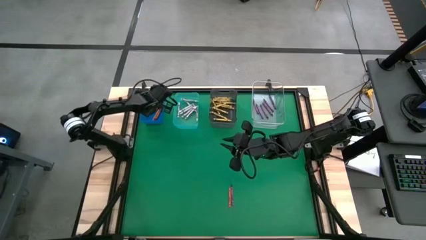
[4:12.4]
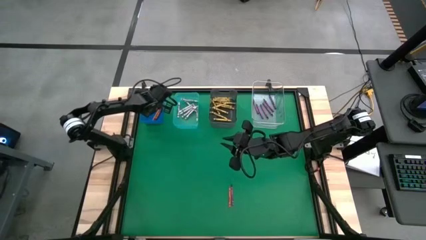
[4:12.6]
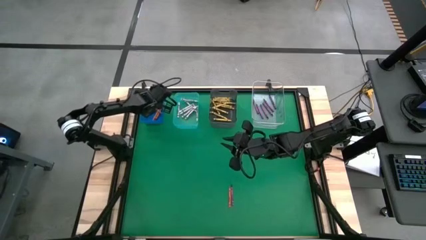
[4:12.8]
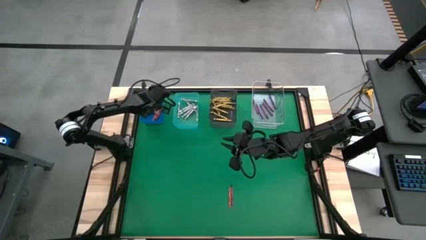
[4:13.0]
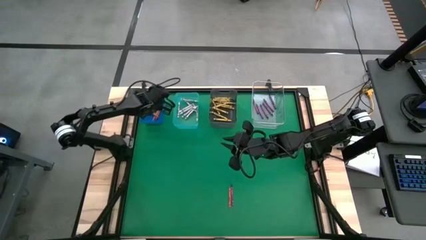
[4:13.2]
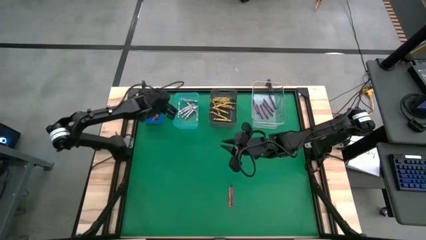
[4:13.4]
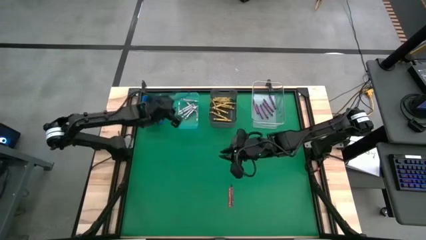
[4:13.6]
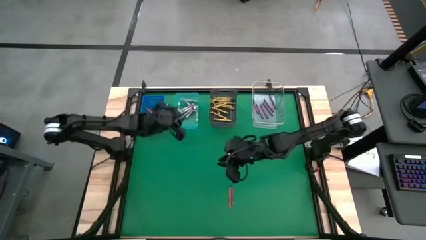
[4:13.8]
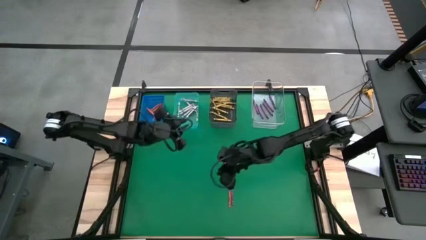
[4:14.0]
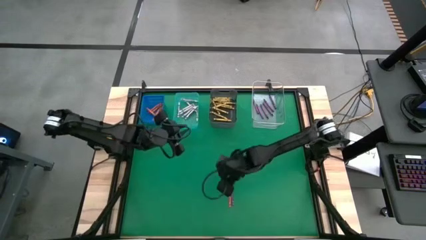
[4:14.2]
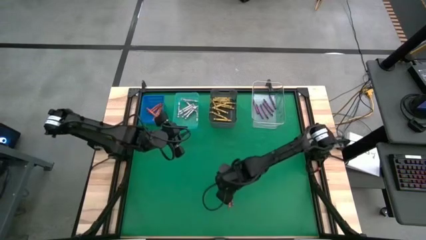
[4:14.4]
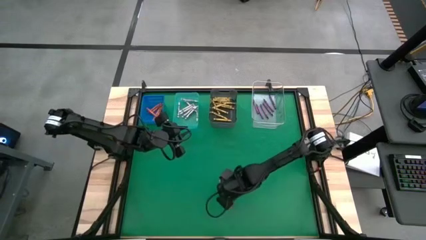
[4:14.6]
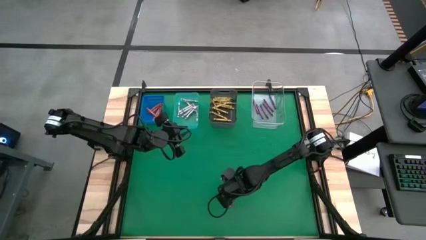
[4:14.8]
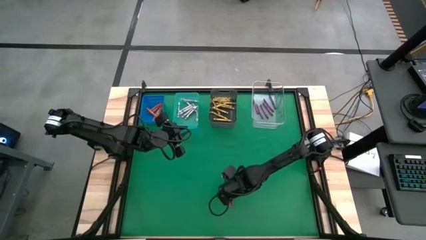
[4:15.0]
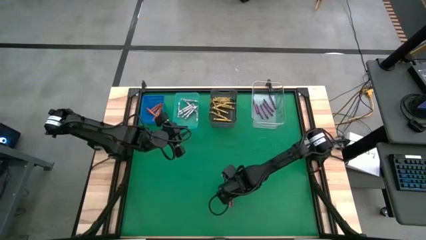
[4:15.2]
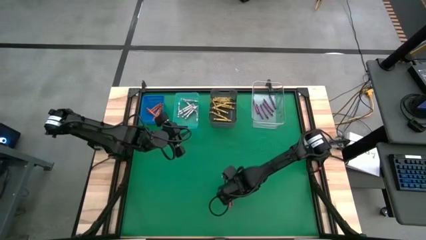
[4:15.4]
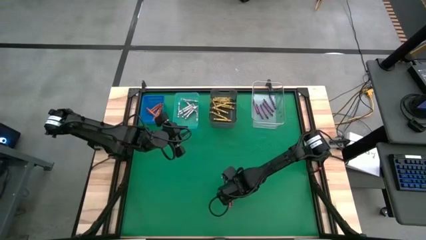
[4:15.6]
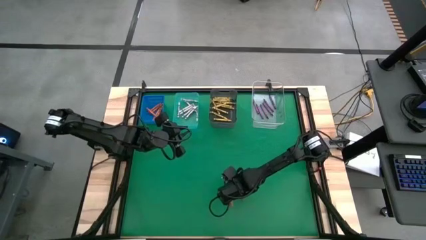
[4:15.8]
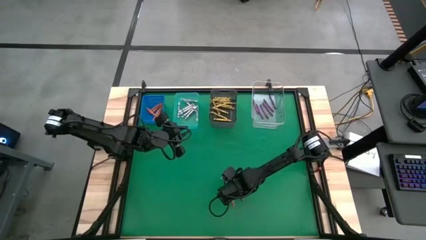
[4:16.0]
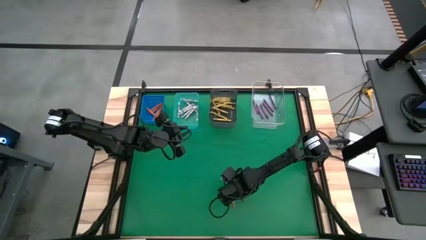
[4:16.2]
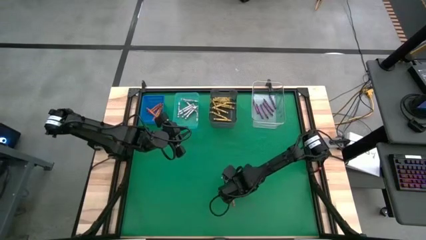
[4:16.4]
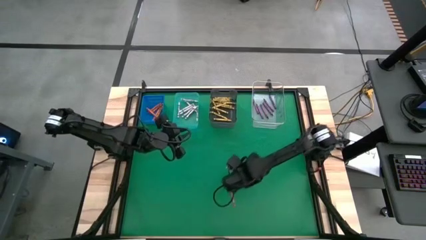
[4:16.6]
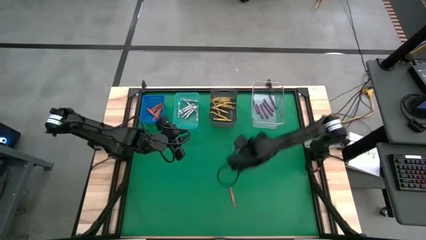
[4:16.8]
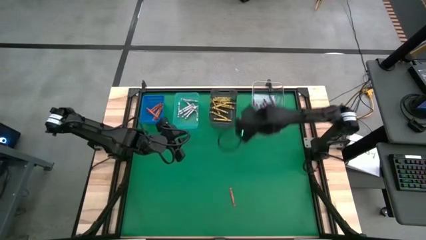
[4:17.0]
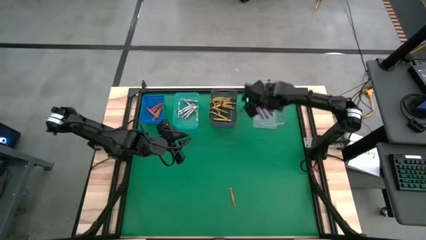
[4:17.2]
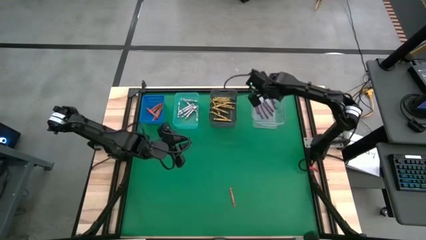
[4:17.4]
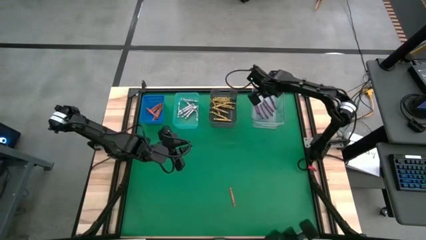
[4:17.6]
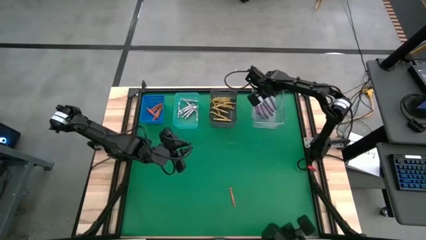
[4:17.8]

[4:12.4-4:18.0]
Task: Sort crayons
Put the violet crayon into the transparent bin

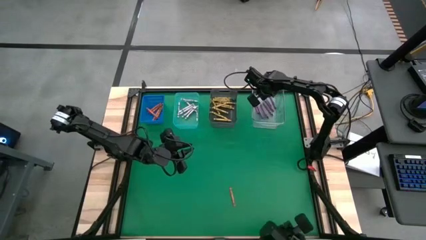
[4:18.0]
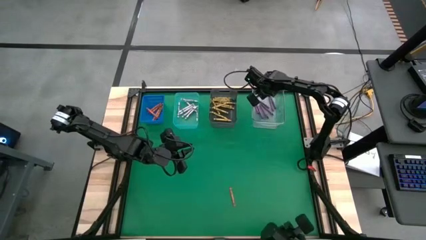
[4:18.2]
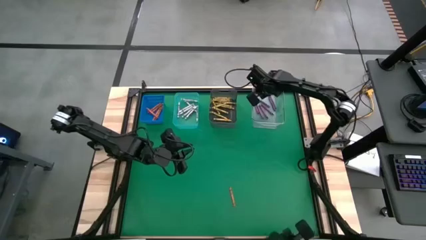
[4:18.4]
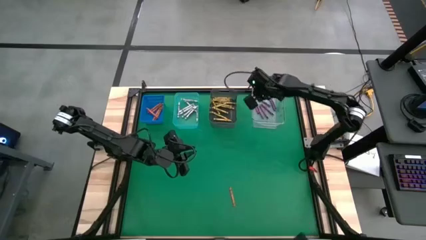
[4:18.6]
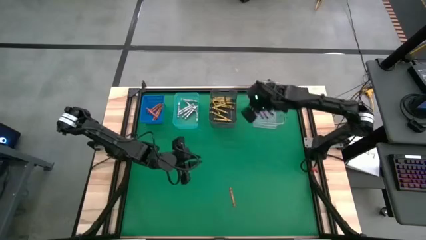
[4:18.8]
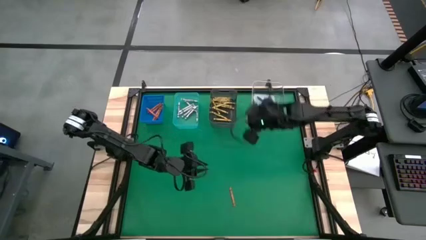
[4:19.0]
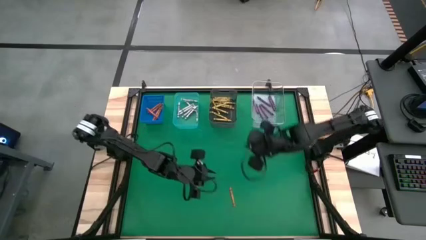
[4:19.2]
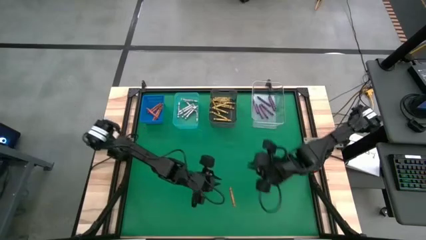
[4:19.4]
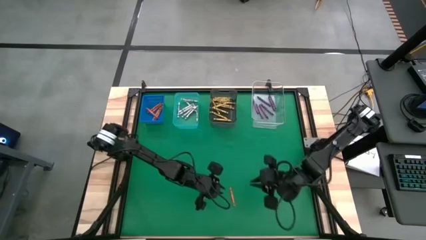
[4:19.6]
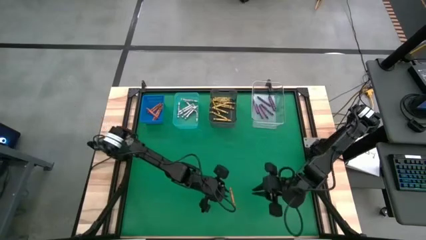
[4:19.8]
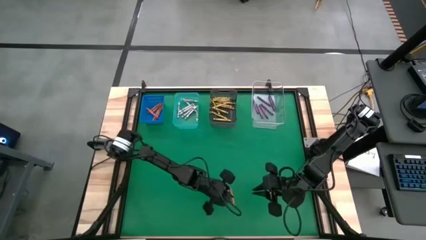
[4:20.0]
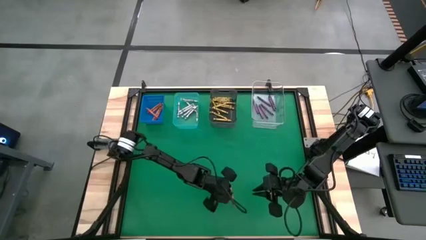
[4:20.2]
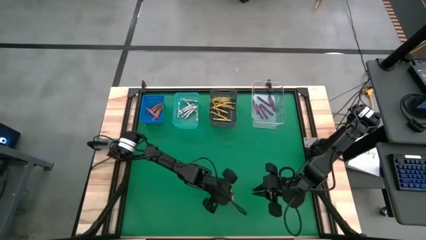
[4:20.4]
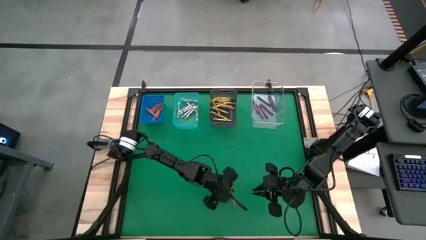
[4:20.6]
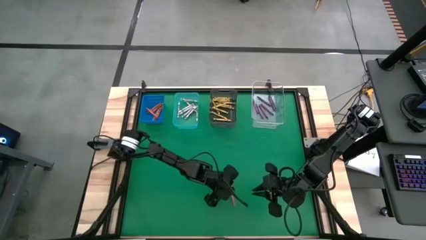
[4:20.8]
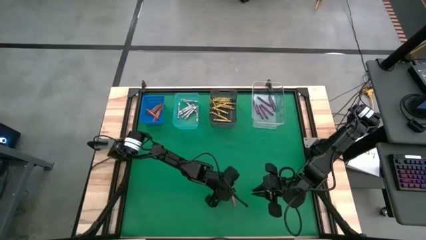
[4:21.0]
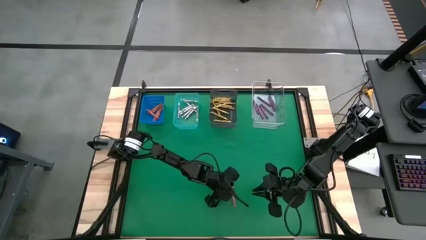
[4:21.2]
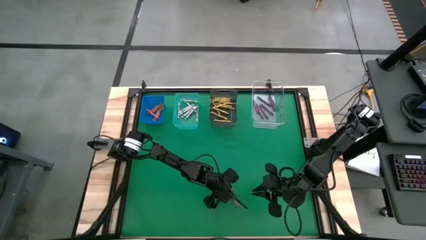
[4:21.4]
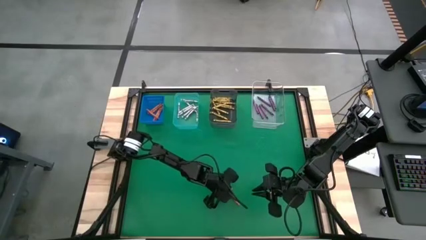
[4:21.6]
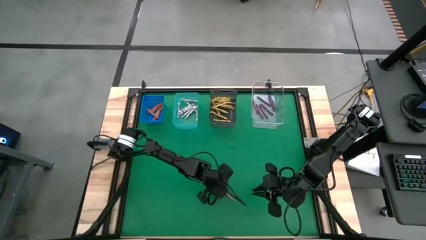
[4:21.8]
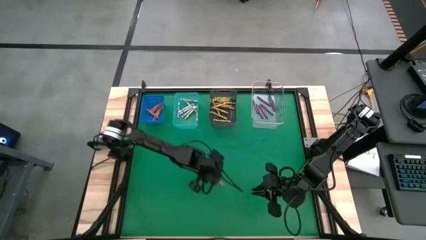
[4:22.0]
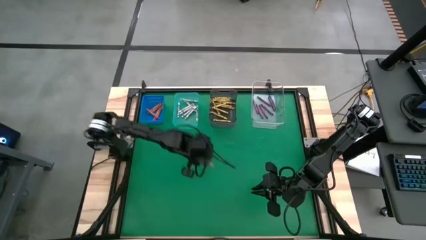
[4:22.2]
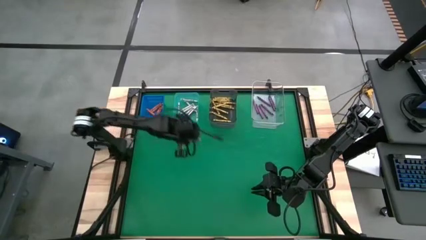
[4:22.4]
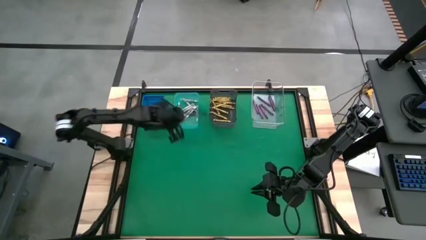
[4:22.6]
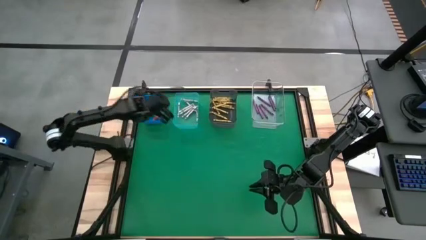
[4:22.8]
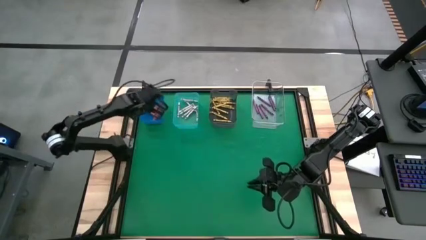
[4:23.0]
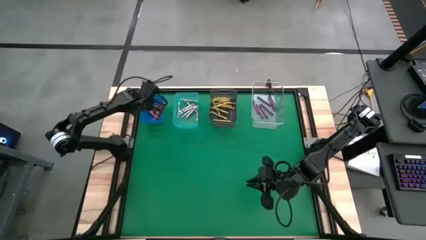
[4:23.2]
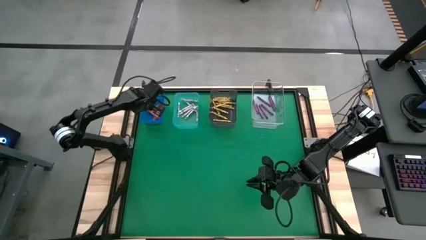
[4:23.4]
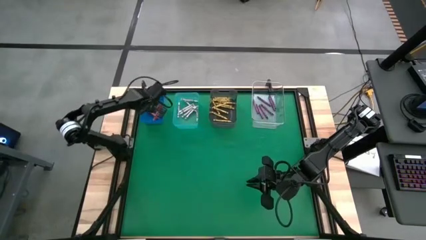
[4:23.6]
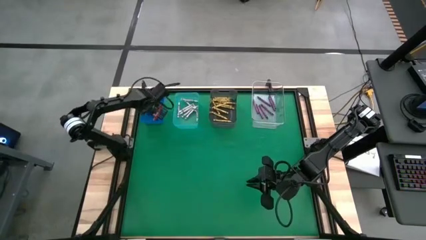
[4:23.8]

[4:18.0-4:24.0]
Put the red crayon into the blue bin

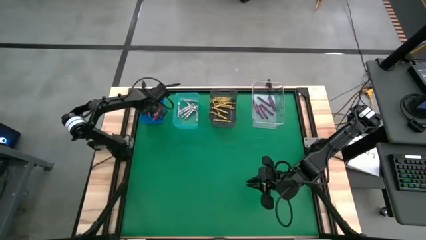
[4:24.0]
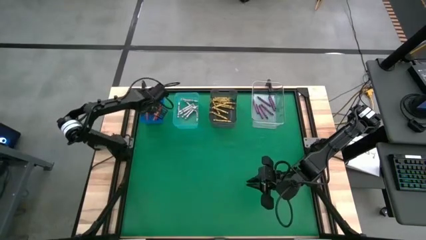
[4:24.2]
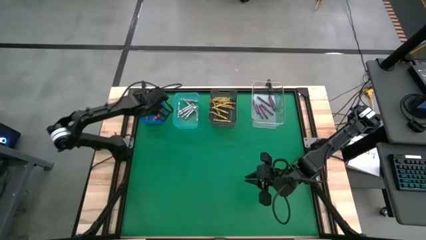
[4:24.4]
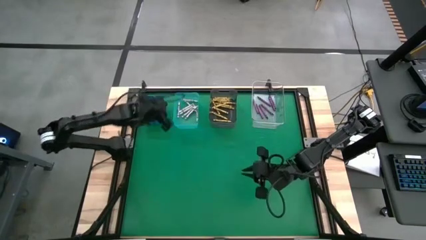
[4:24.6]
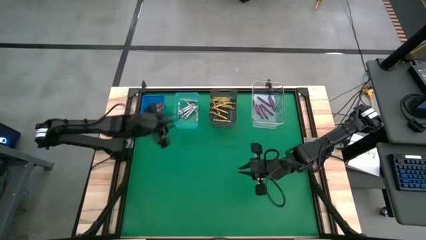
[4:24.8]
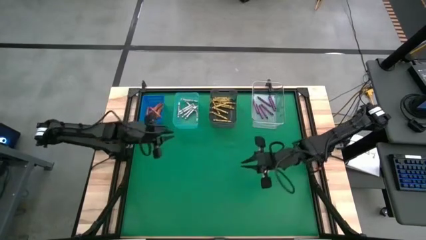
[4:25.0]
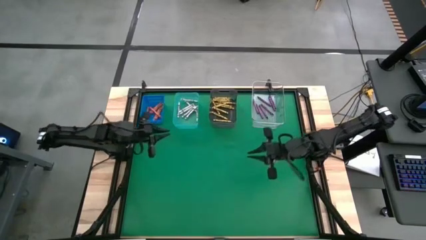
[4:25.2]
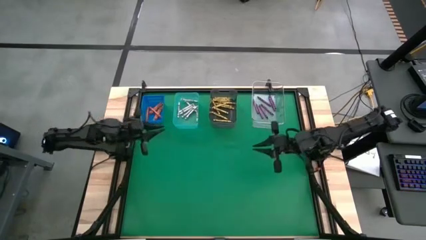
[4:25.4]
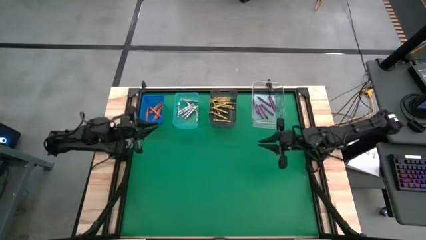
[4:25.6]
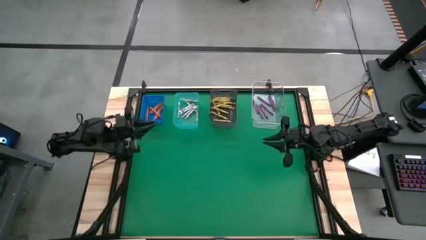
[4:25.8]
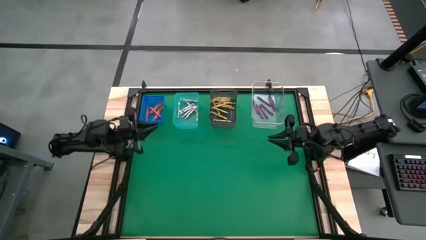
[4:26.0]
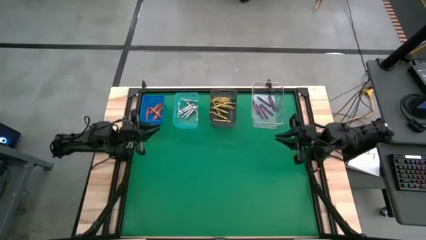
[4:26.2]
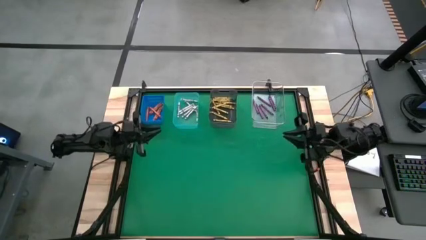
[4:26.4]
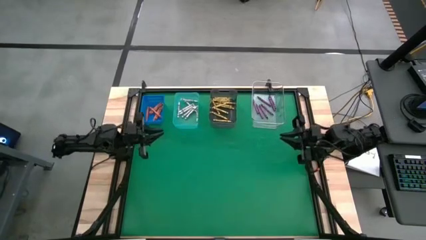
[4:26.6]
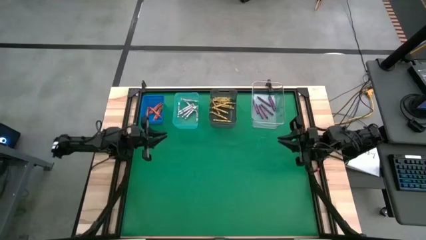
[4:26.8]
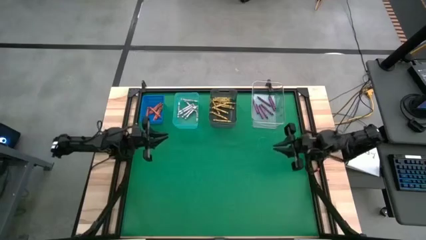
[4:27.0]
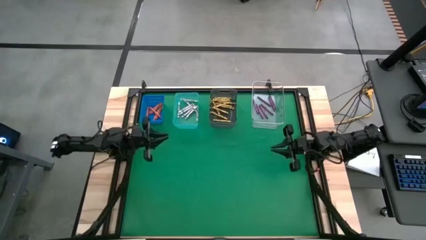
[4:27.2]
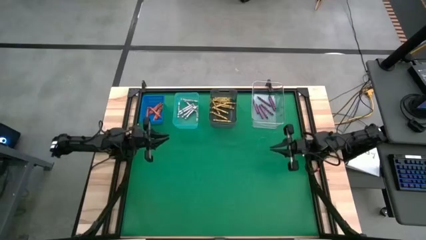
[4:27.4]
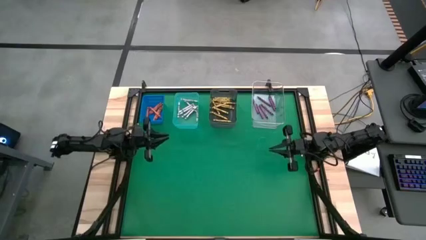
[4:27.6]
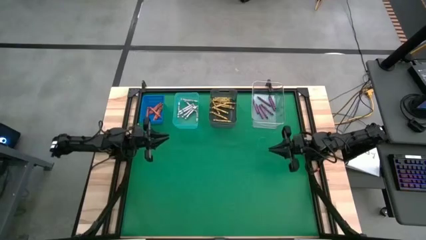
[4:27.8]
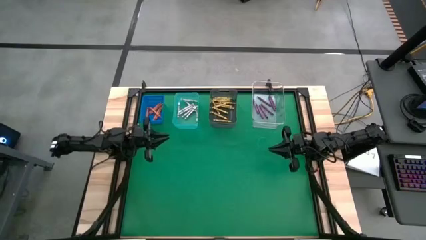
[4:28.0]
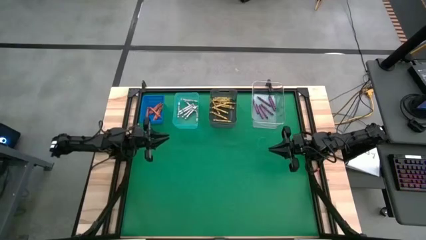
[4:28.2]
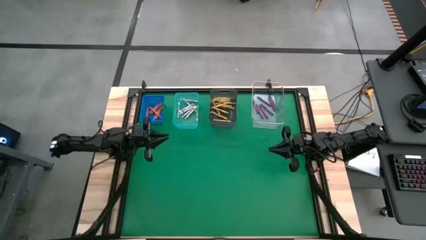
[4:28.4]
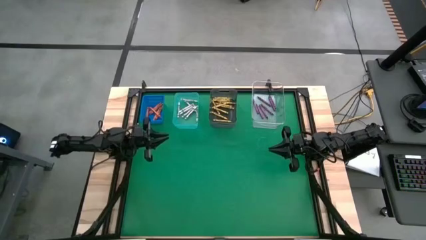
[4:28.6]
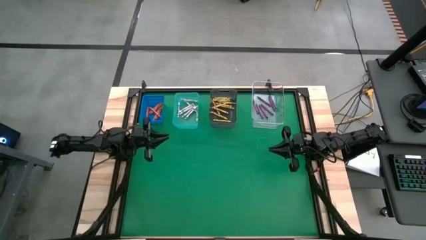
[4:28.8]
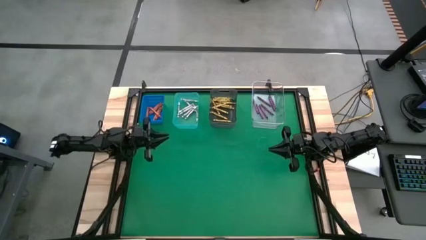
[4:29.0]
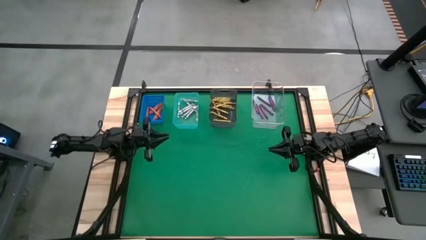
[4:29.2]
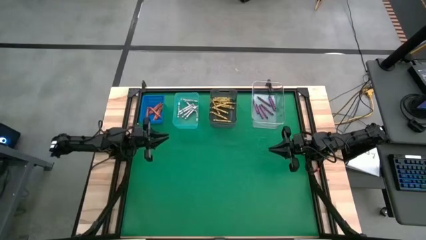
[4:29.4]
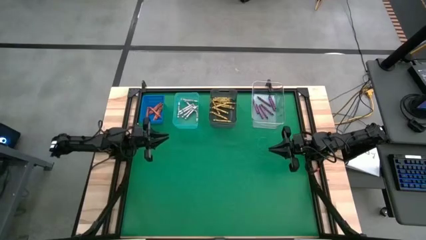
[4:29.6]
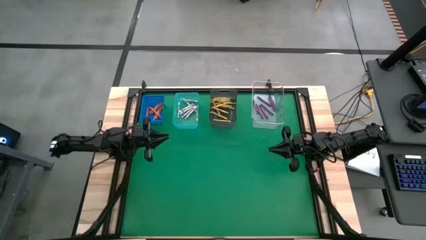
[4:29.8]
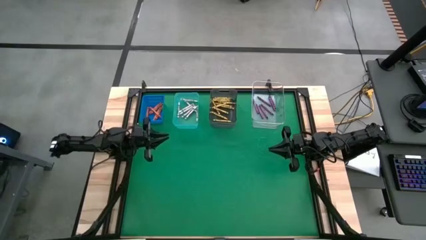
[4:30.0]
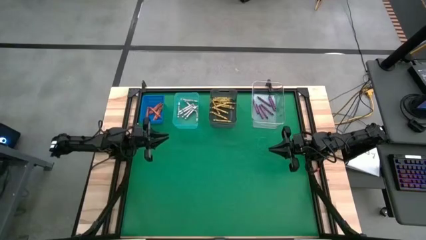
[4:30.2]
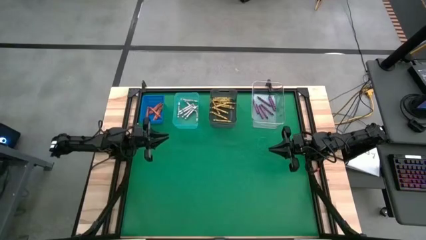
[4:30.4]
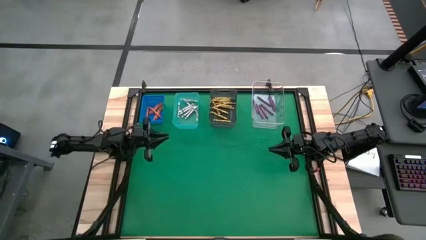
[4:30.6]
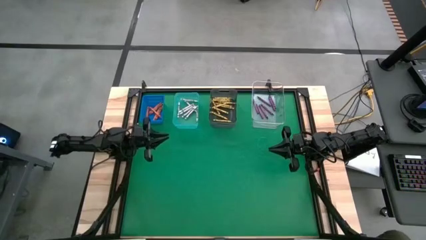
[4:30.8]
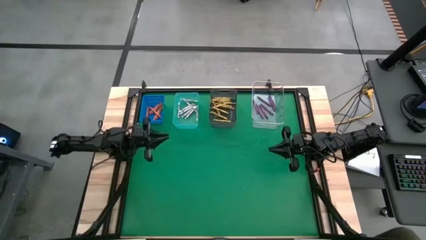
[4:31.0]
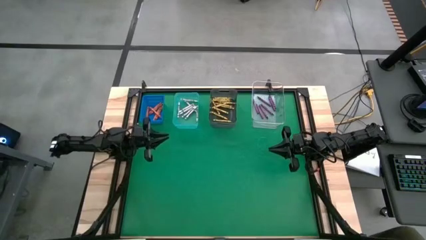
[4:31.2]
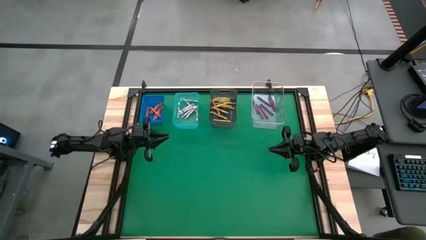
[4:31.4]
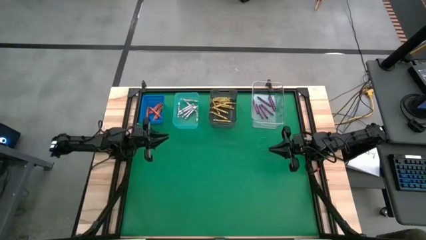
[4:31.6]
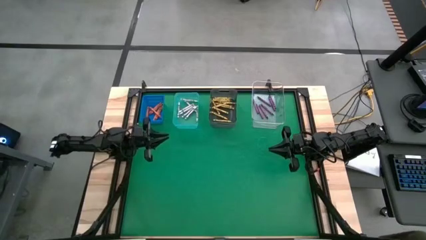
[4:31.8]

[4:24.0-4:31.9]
Return to Home Position
